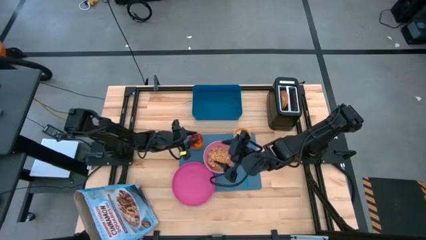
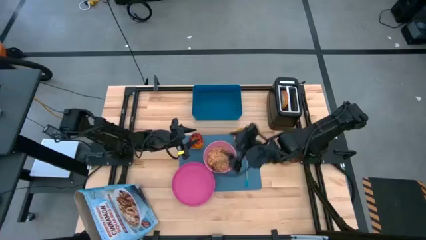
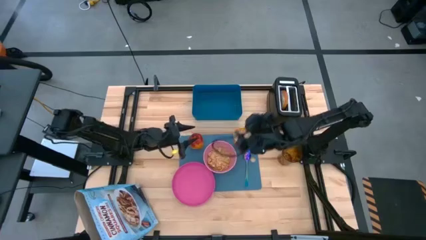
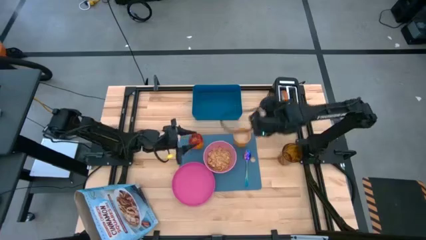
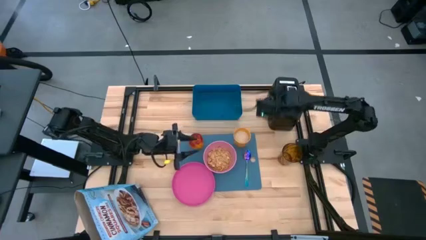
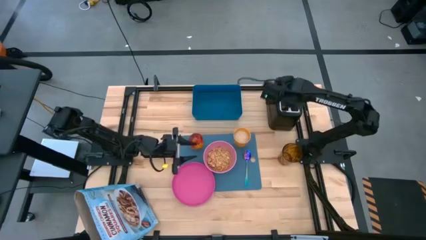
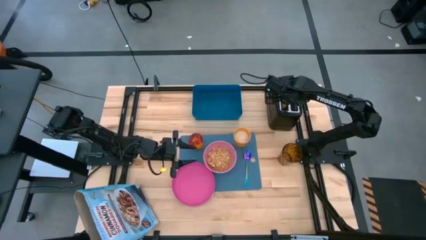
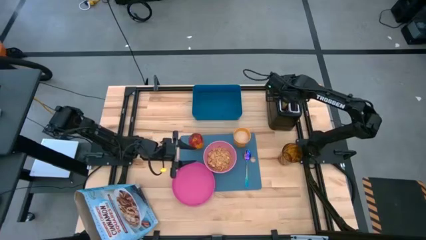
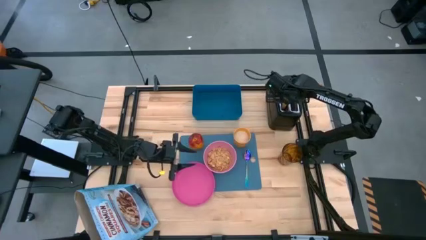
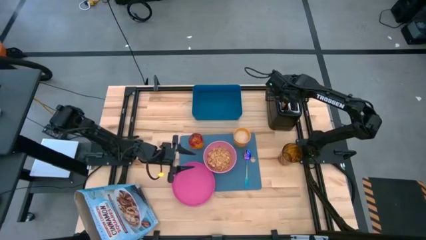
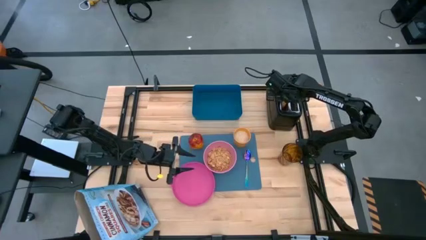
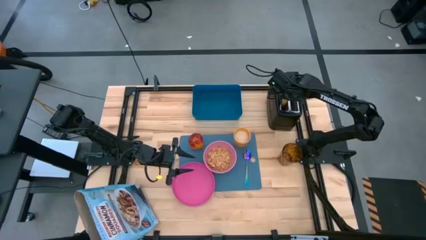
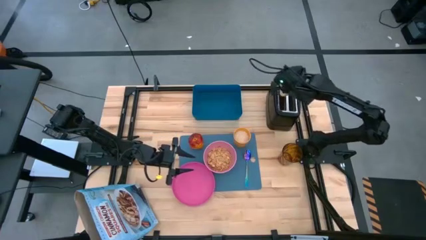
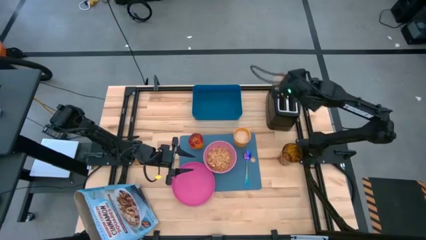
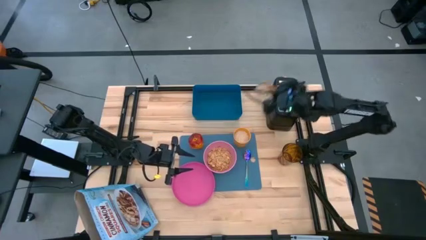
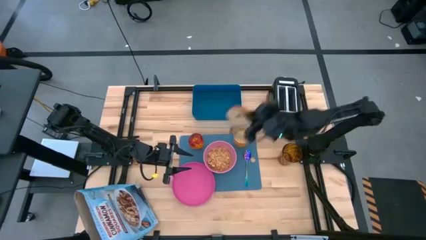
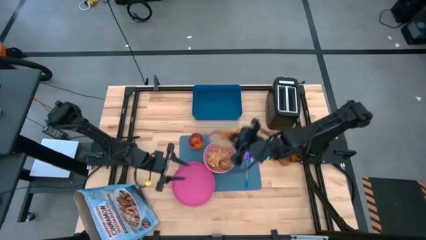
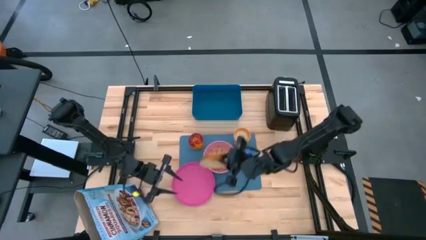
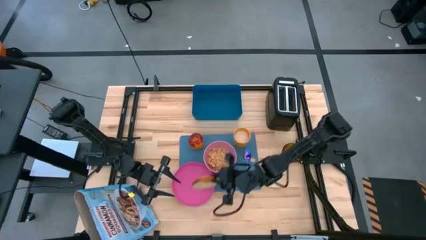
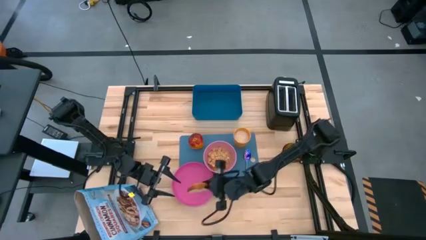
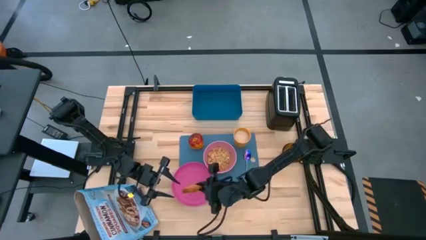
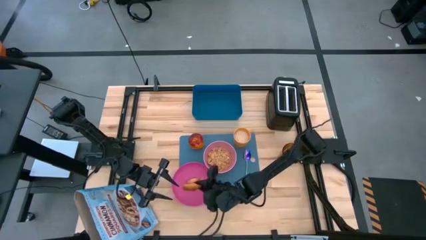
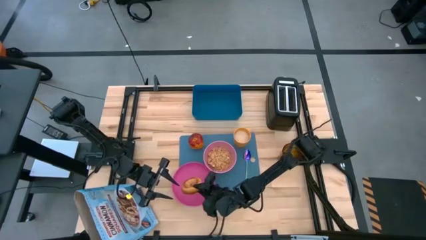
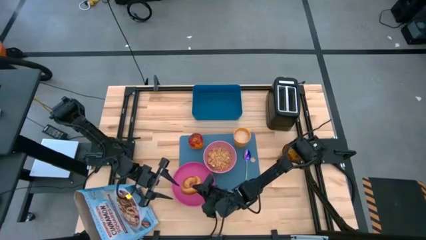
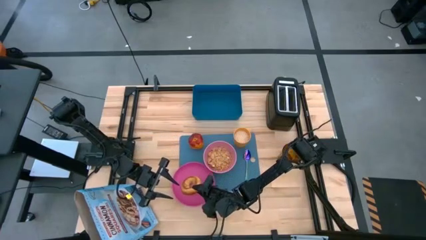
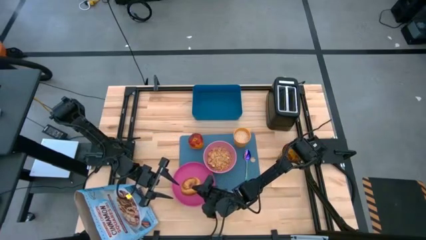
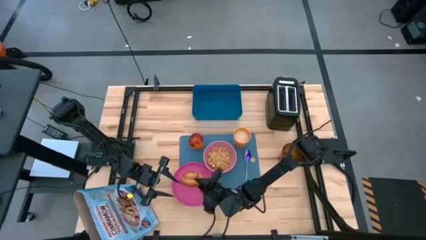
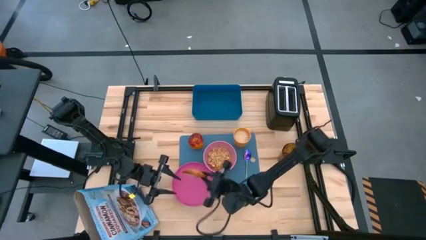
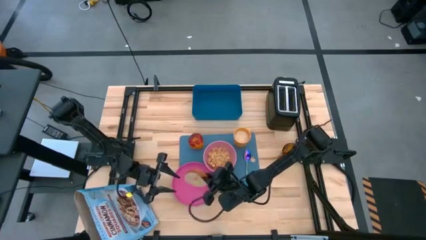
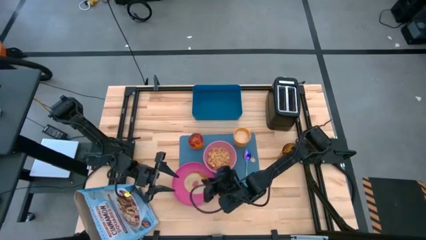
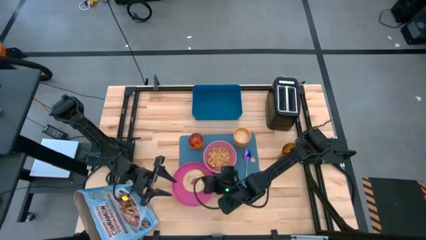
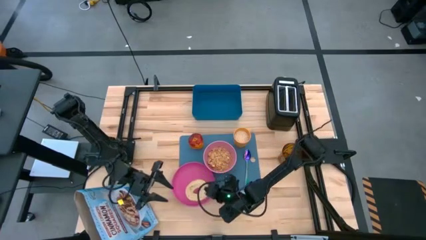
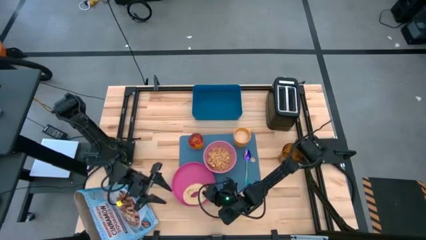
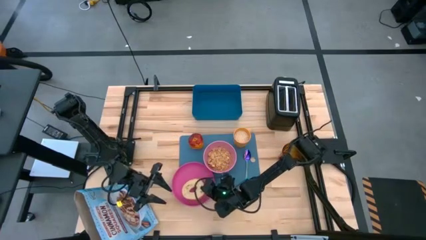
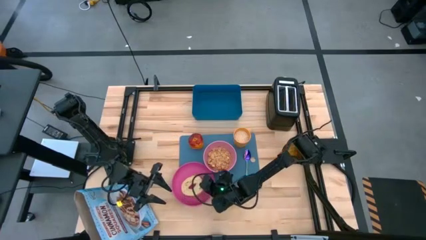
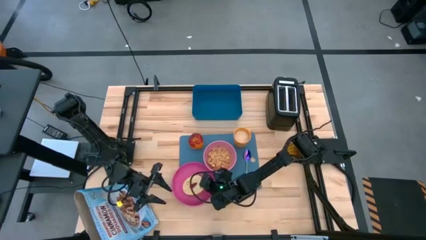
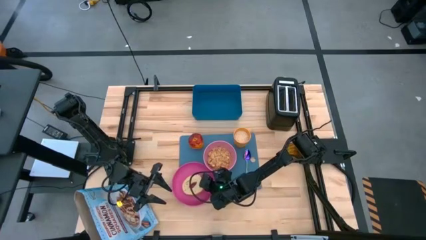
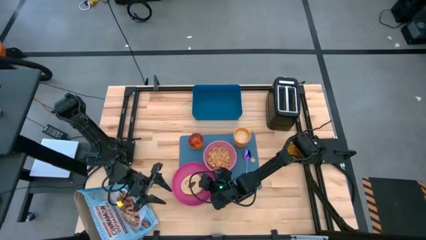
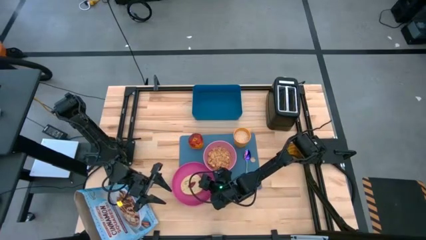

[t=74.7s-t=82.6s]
Task: Arrange a breakfast setting
Put the bread on the pink plate

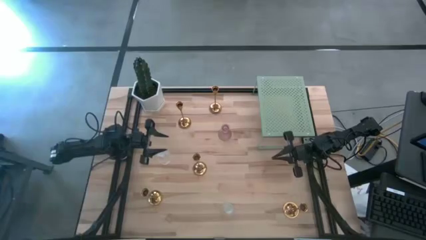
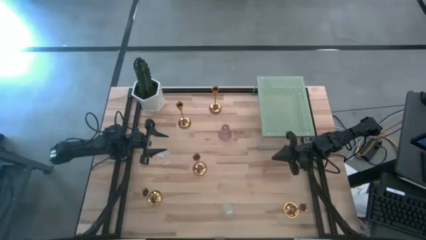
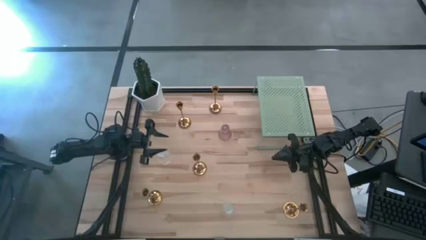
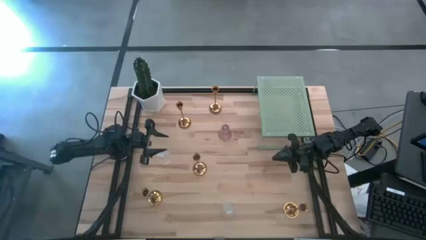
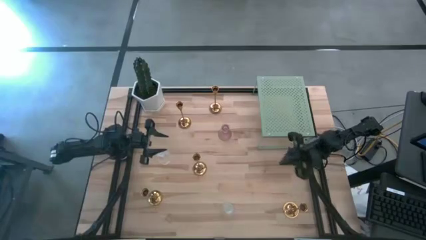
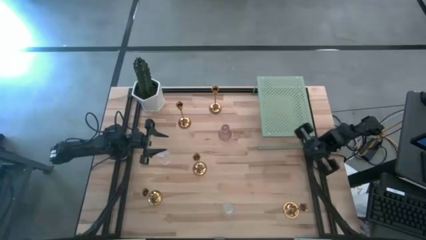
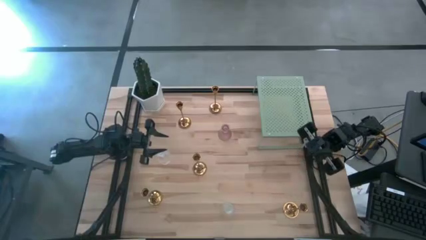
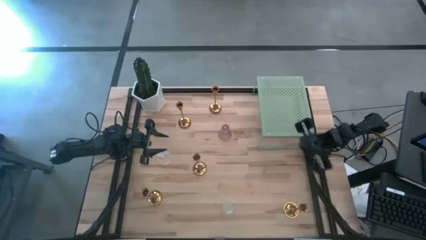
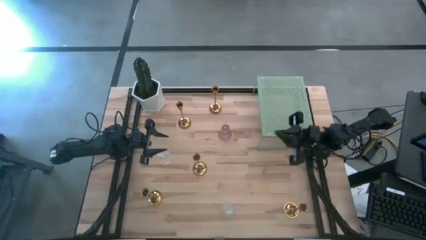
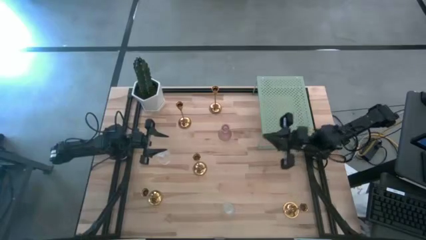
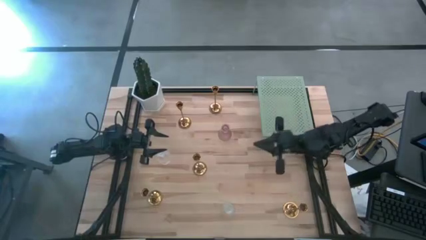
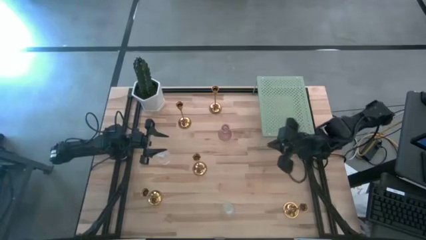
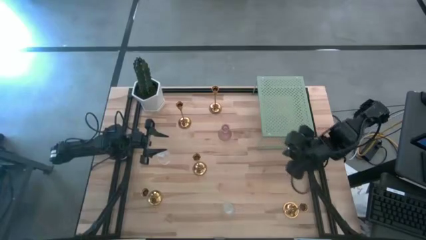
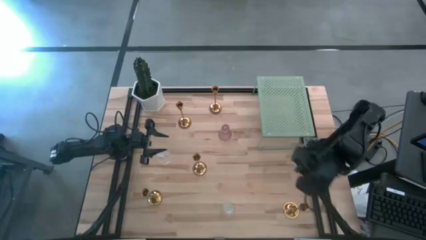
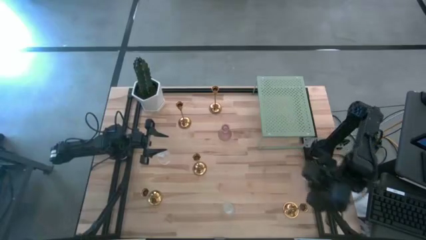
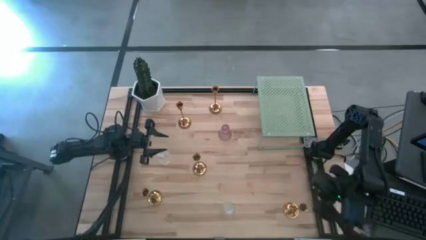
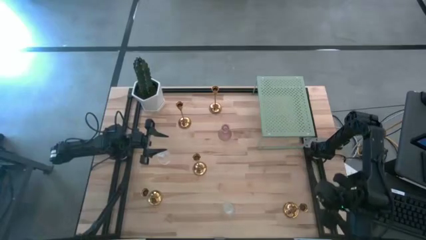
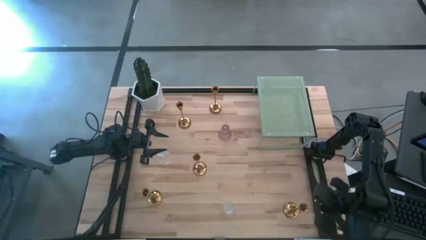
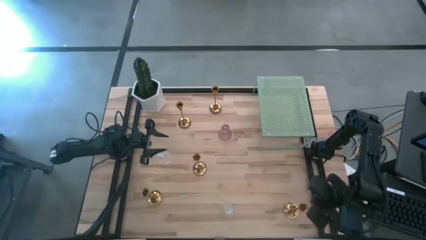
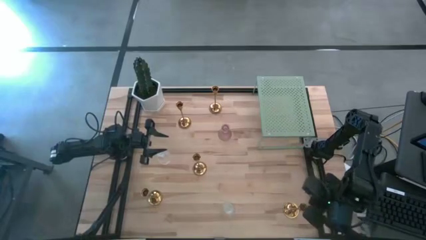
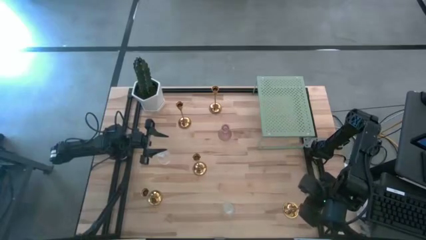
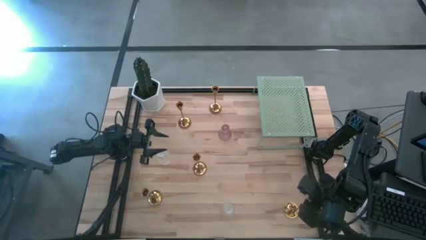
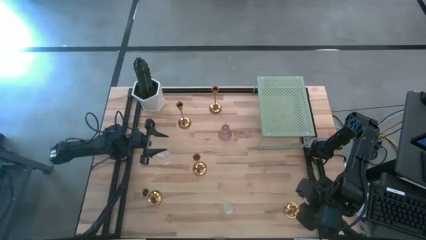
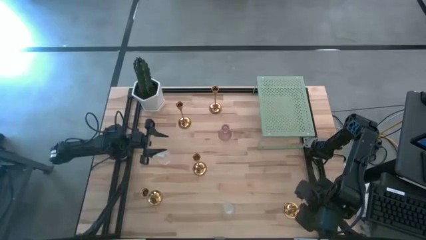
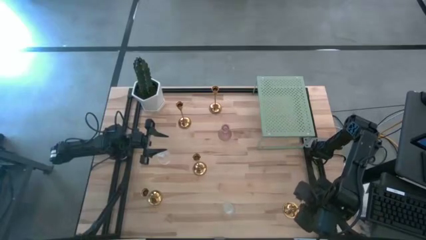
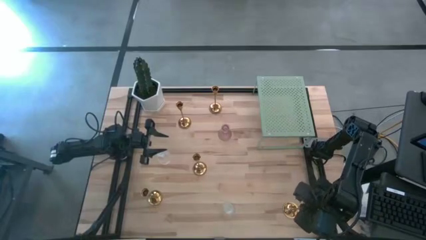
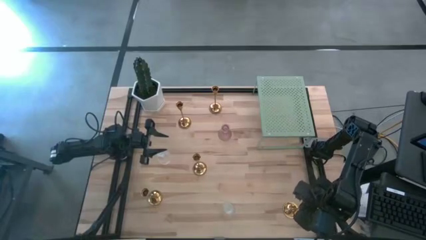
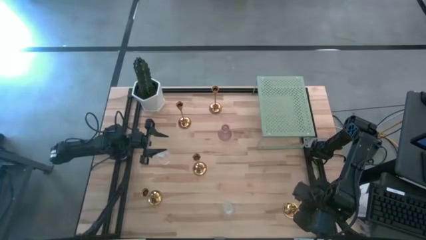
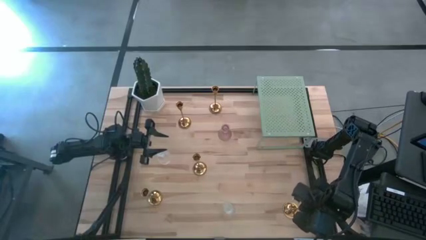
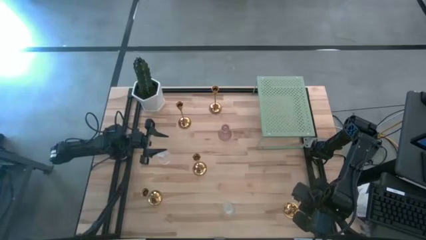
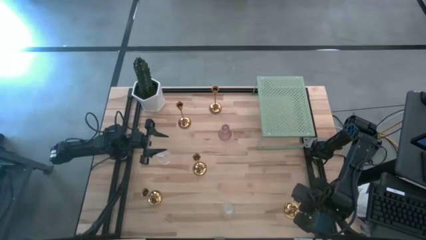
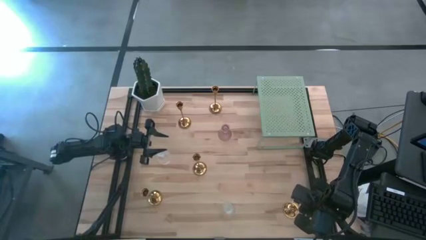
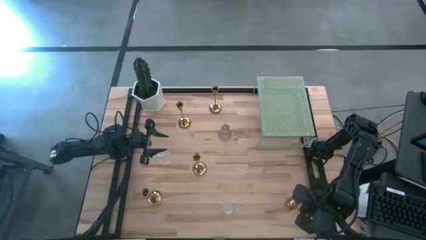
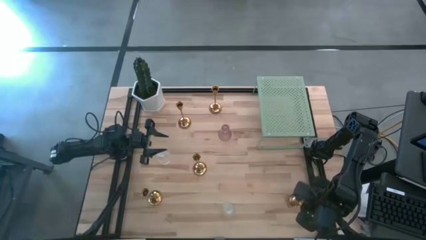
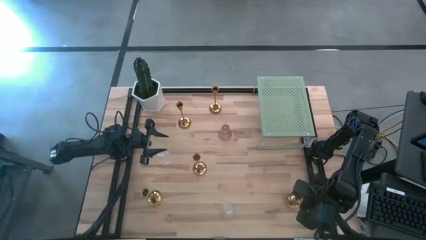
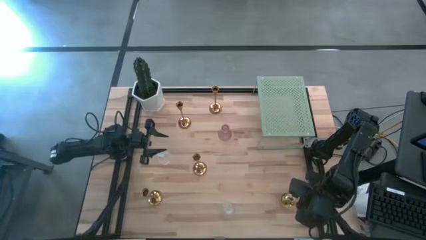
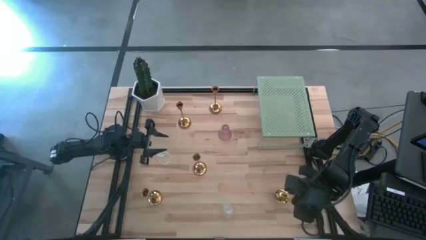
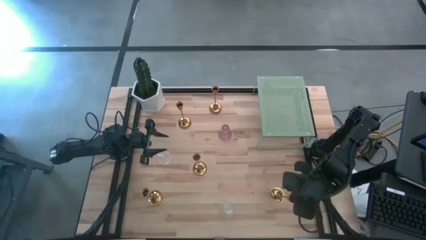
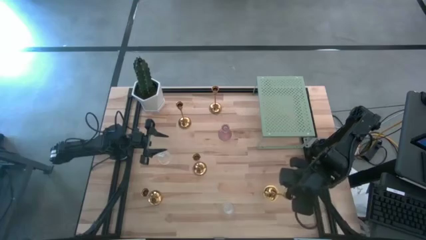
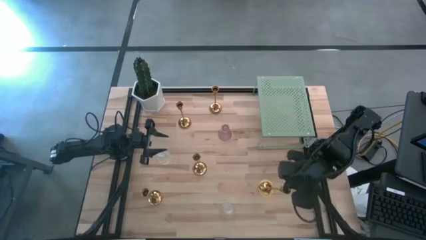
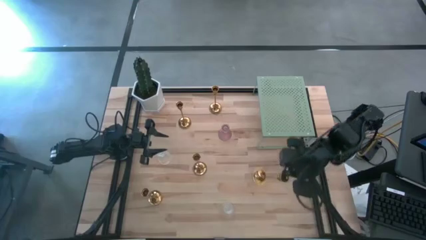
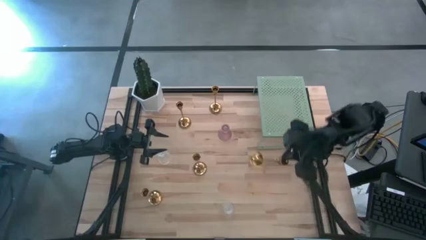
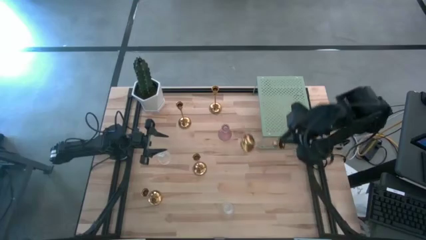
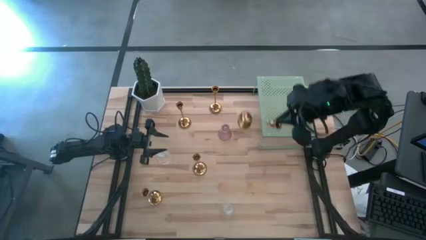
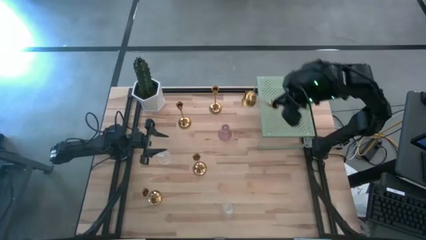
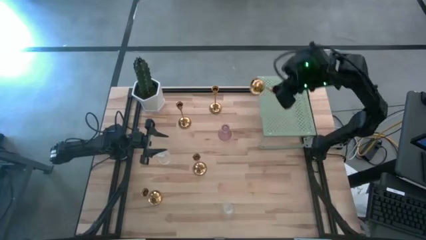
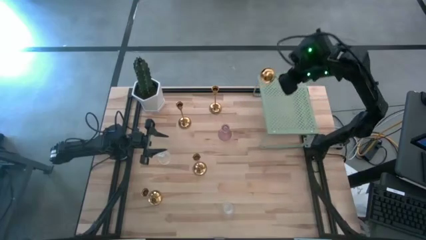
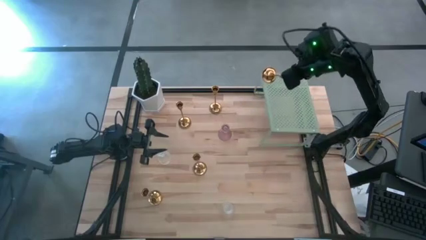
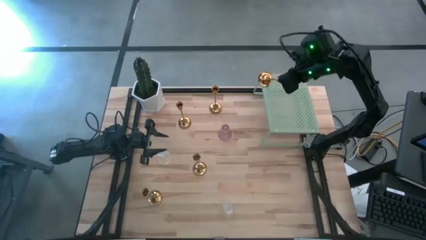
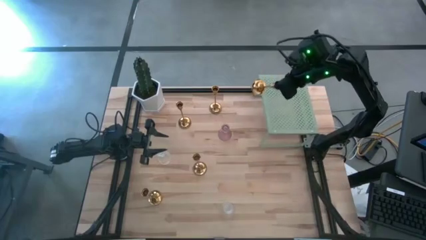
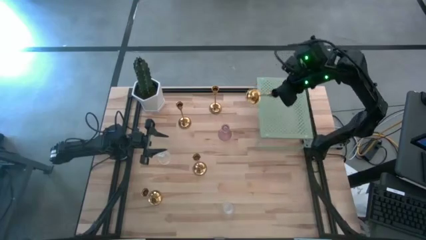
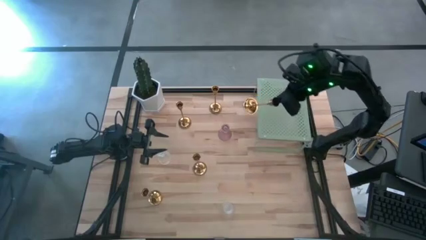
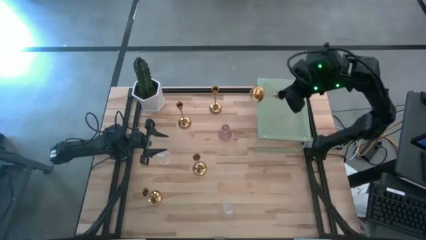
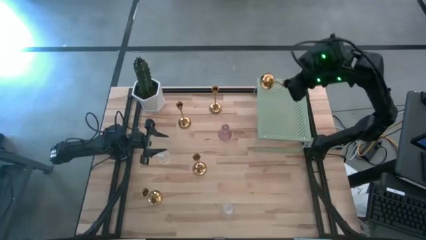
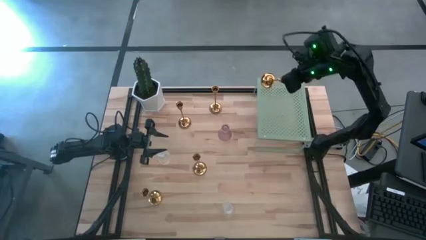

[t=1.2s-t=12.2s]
Task: Pick & Place candle stick holders
Put the gold candle holder on the shelf
